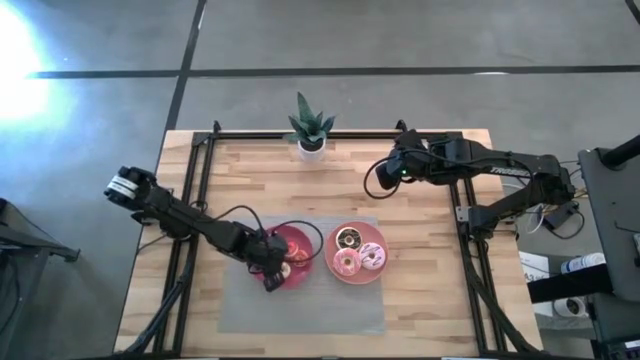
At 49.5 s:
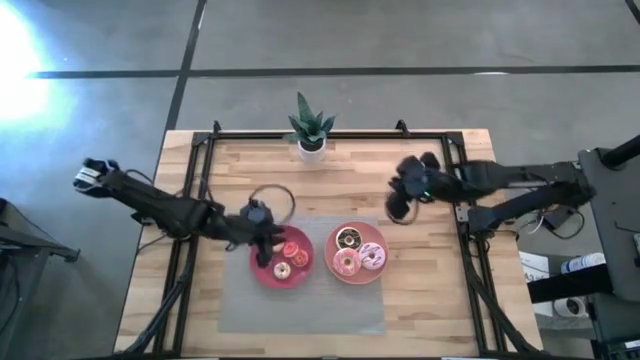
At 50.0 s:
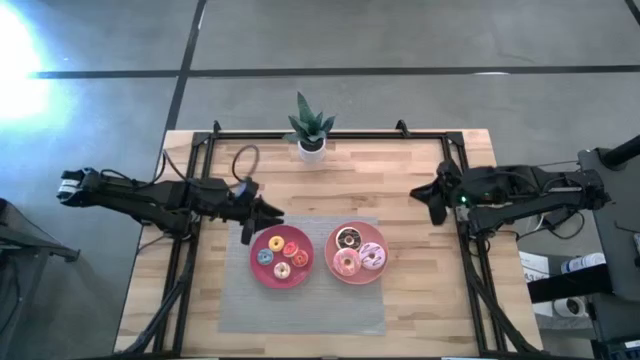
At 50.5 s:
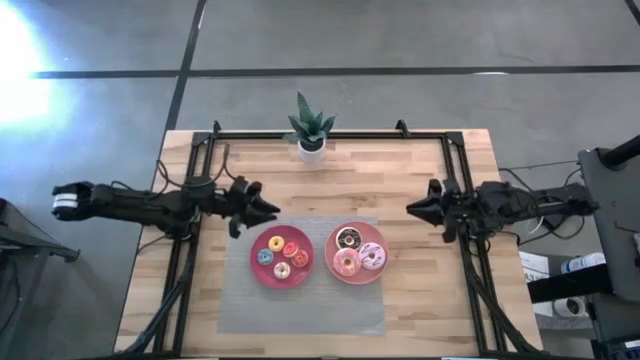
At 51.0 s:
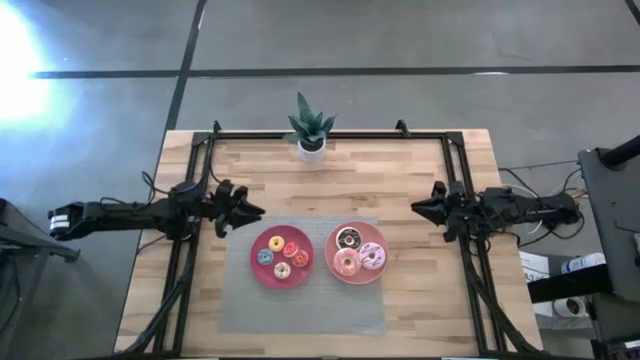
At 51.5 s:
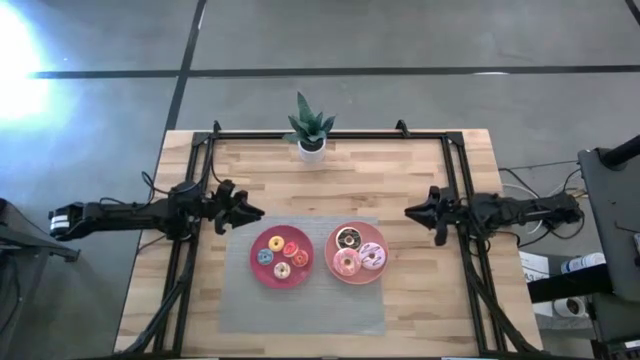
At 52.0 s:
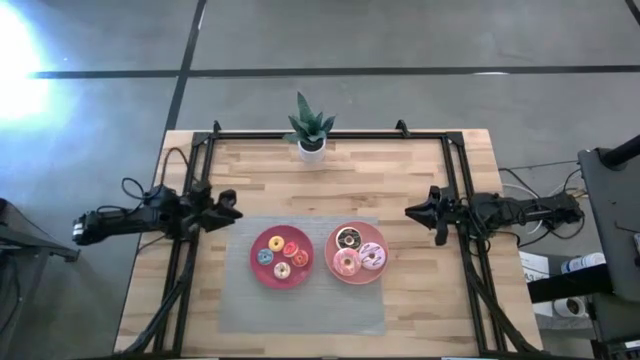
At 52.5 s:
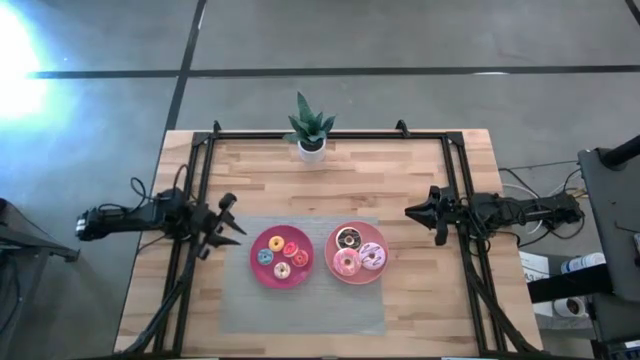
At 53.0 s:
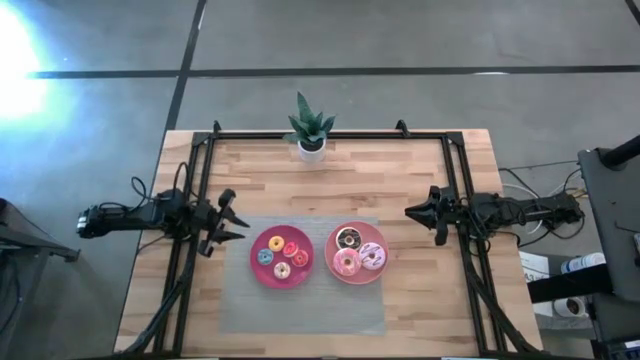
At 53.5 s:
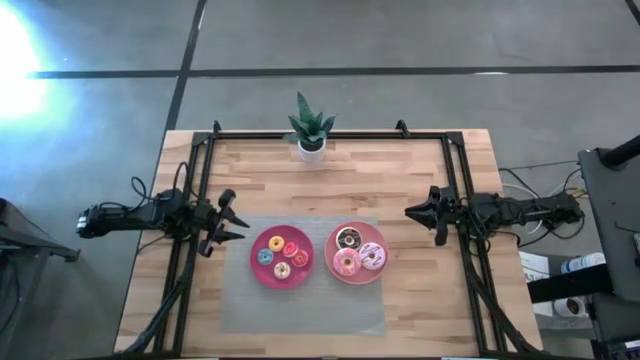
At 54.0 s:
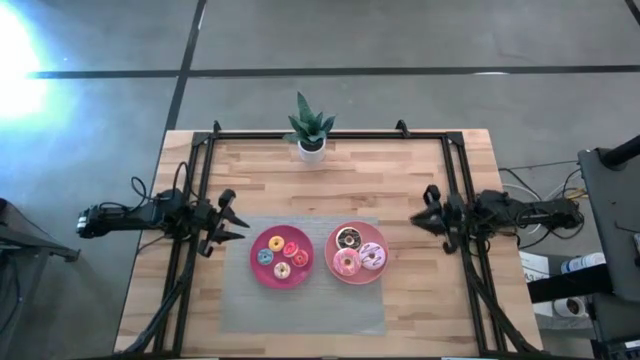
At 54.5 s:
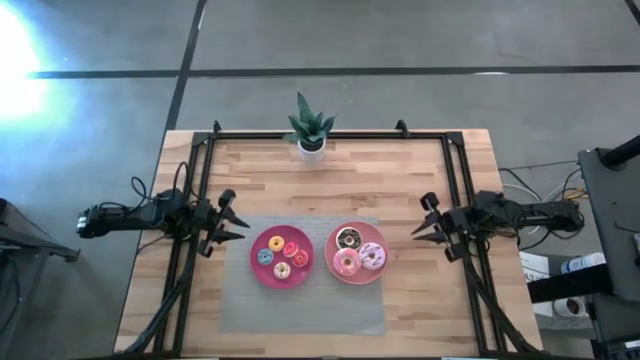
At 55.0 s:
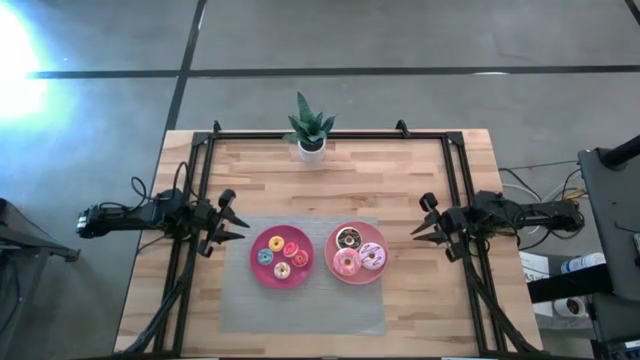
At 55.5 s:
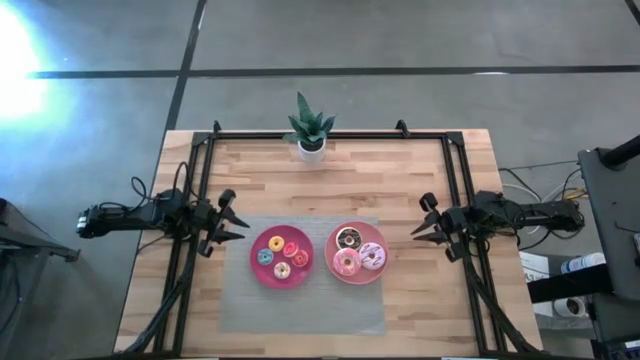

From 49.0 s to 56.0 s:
Task: Pick & Place donuts
Return to Home Position

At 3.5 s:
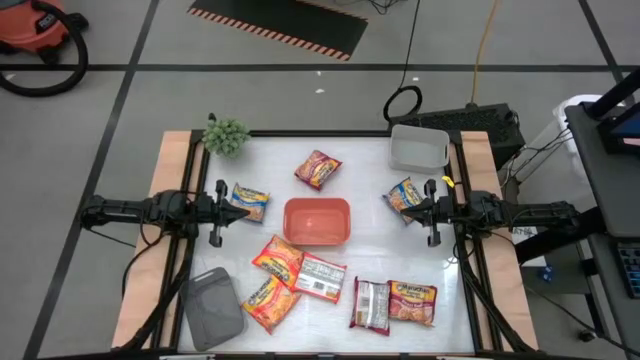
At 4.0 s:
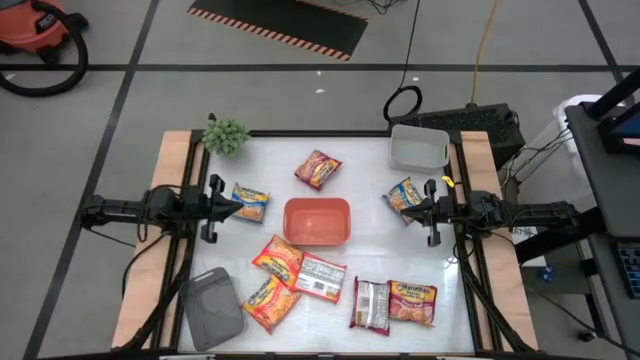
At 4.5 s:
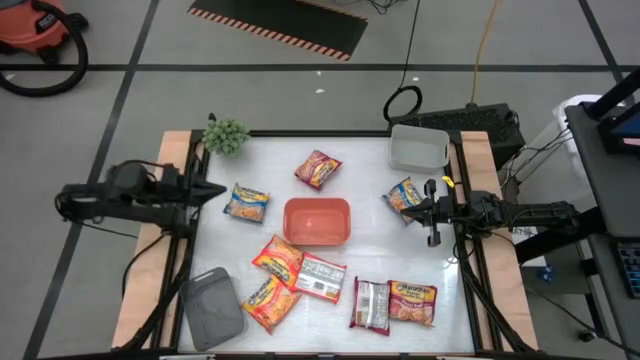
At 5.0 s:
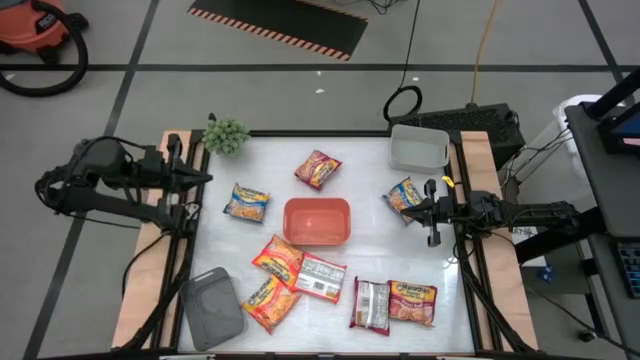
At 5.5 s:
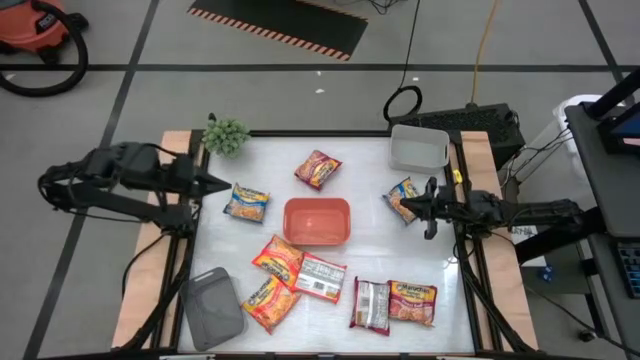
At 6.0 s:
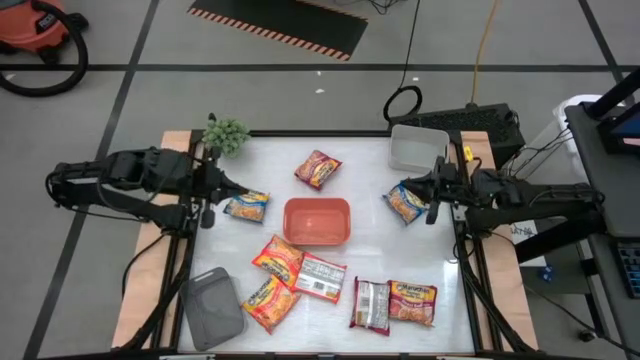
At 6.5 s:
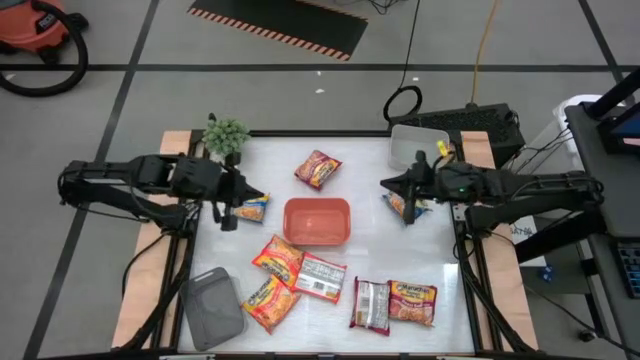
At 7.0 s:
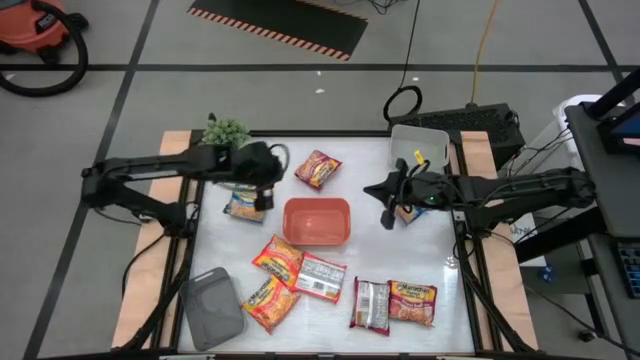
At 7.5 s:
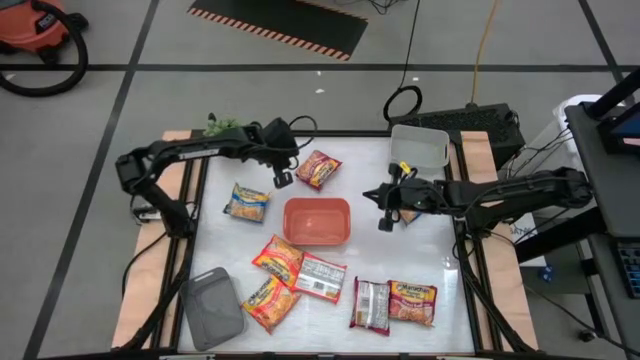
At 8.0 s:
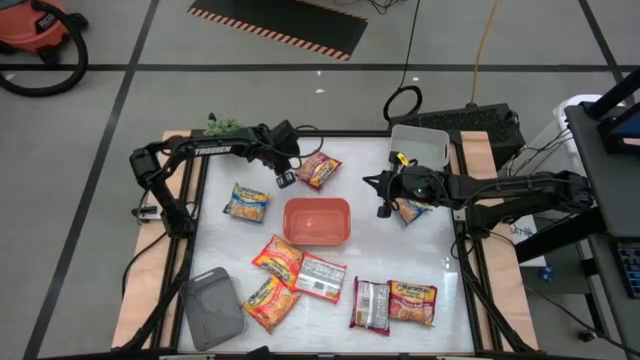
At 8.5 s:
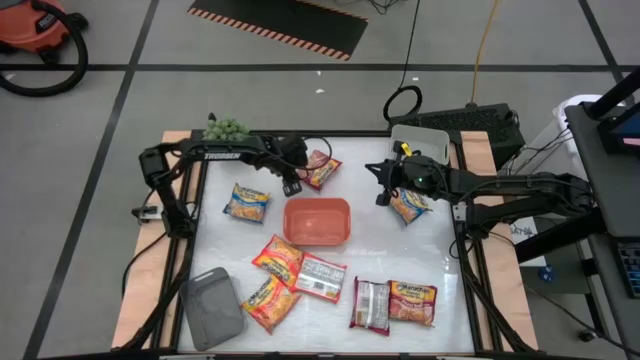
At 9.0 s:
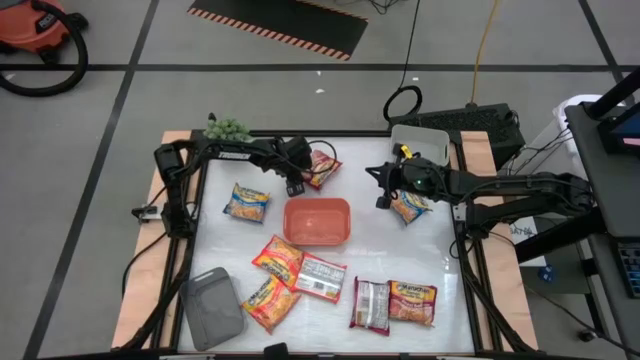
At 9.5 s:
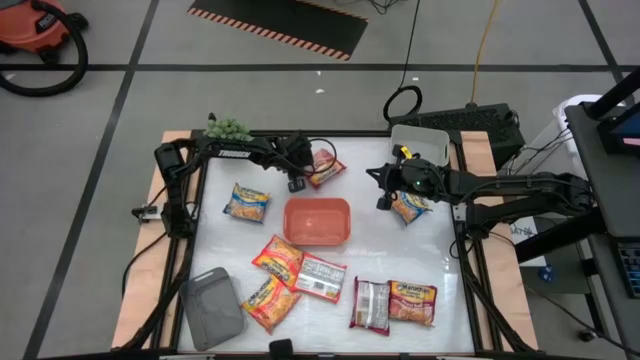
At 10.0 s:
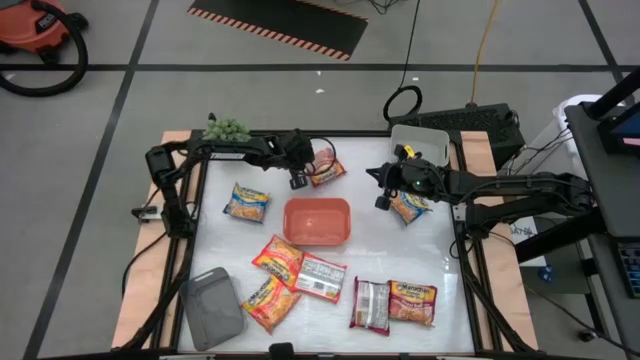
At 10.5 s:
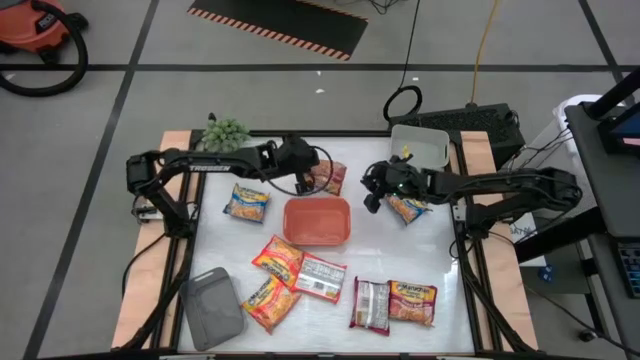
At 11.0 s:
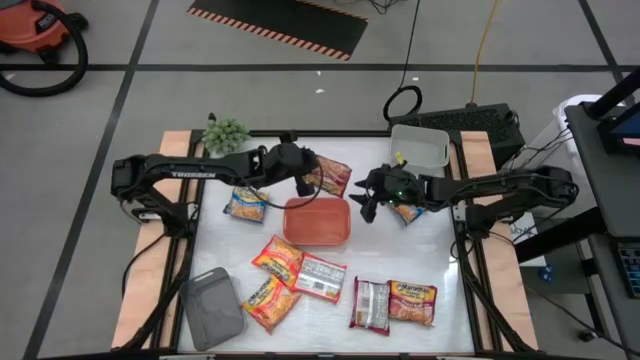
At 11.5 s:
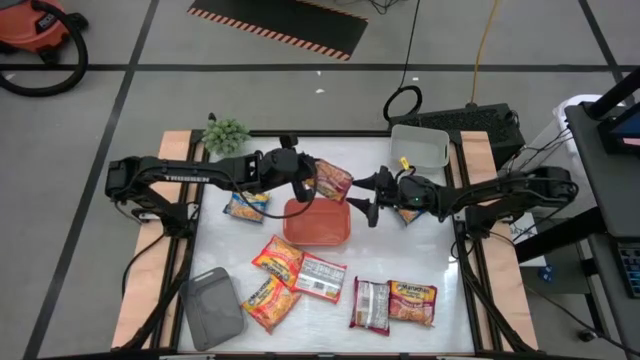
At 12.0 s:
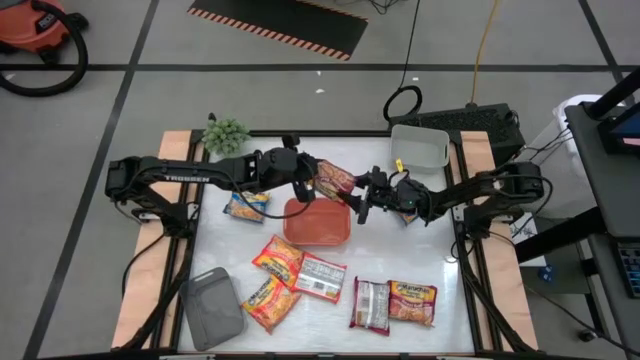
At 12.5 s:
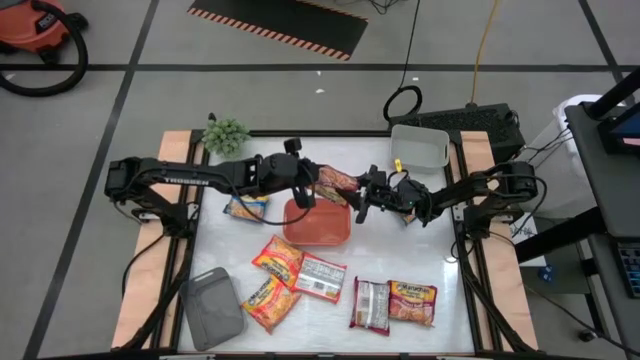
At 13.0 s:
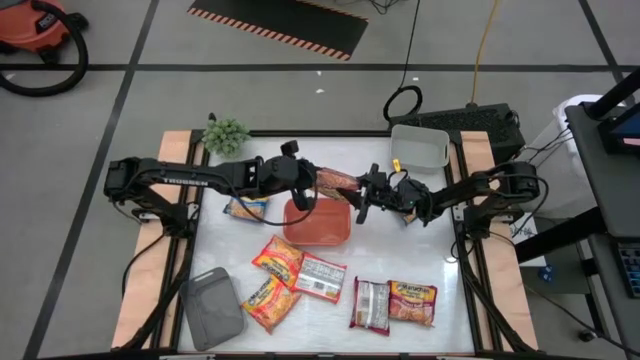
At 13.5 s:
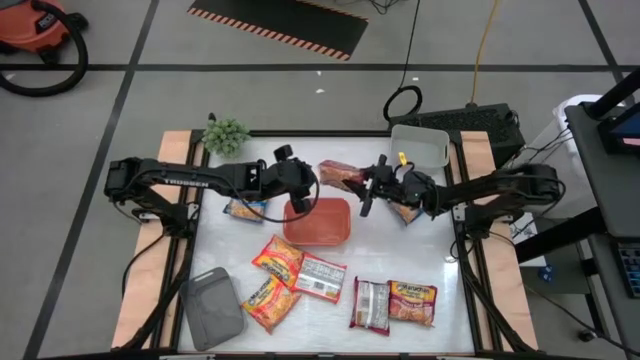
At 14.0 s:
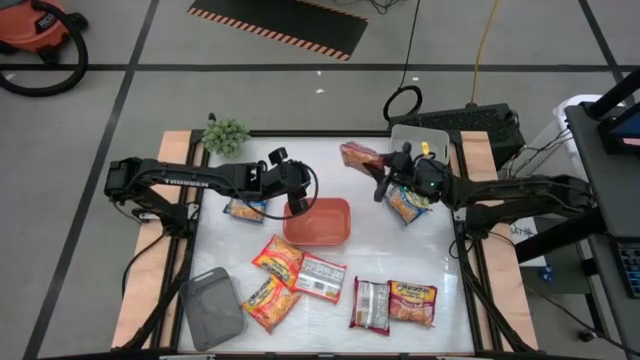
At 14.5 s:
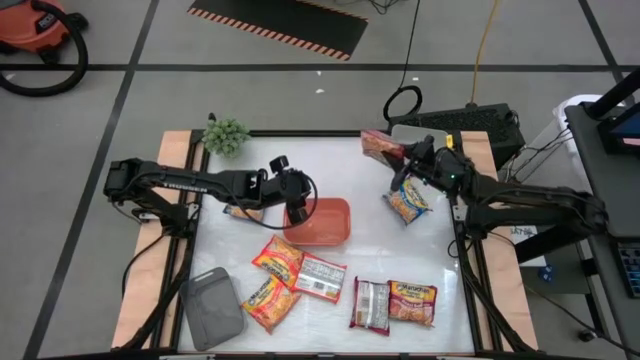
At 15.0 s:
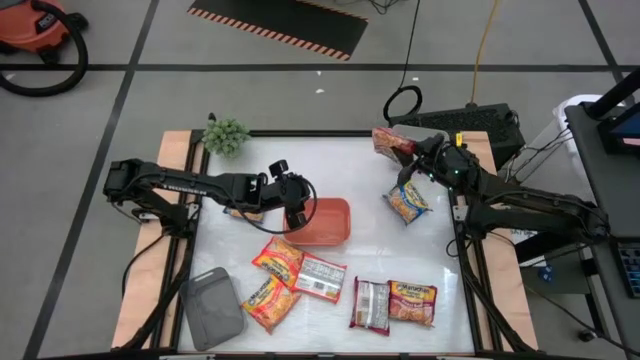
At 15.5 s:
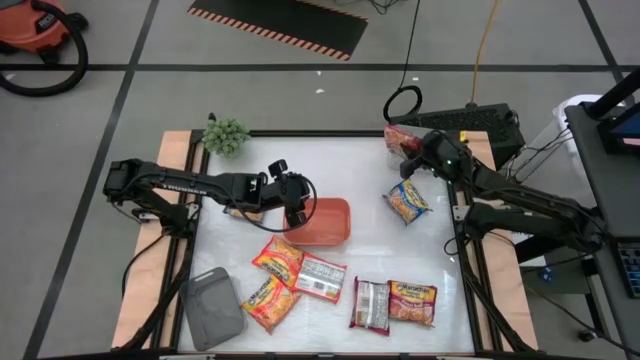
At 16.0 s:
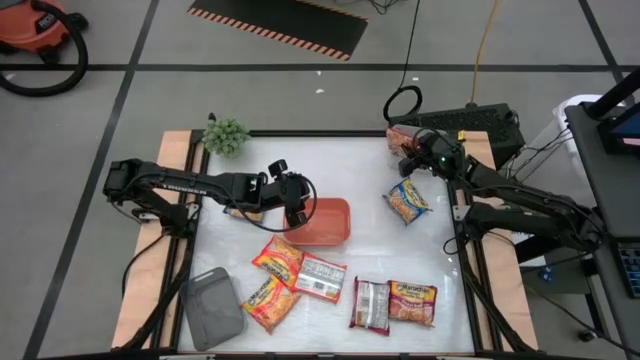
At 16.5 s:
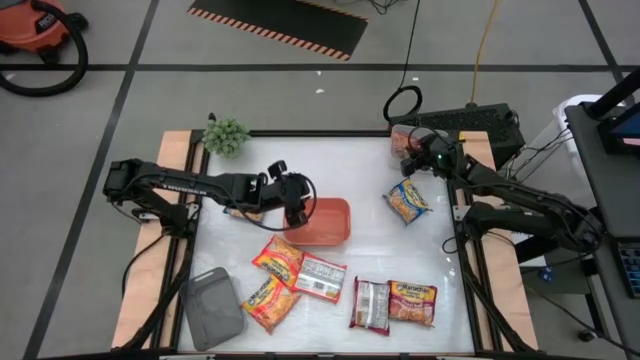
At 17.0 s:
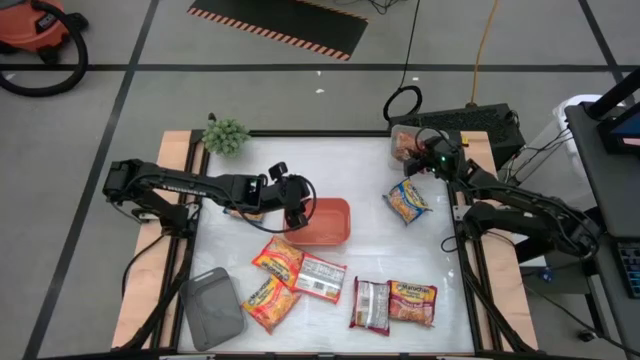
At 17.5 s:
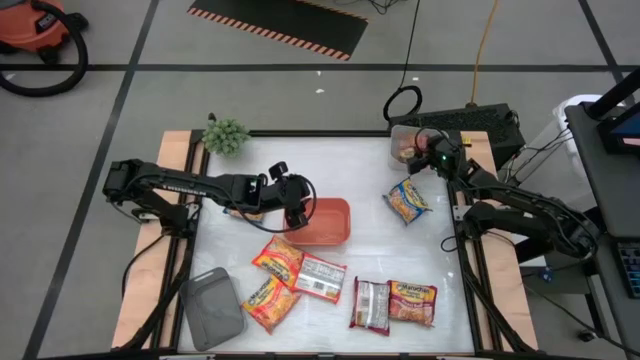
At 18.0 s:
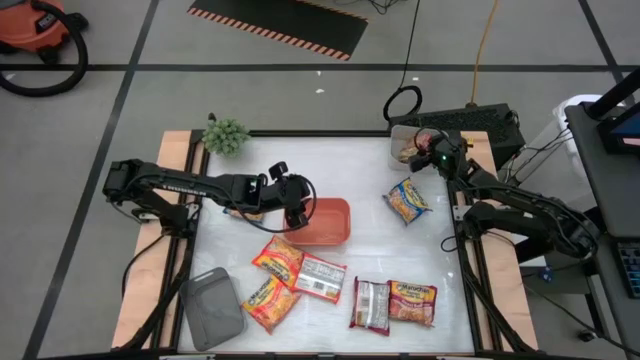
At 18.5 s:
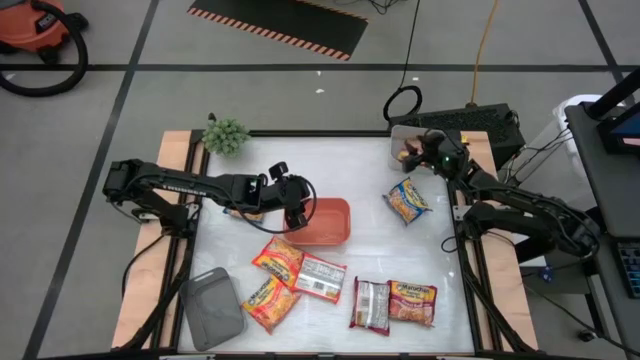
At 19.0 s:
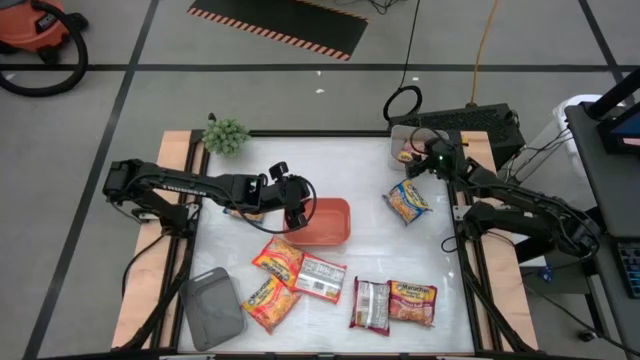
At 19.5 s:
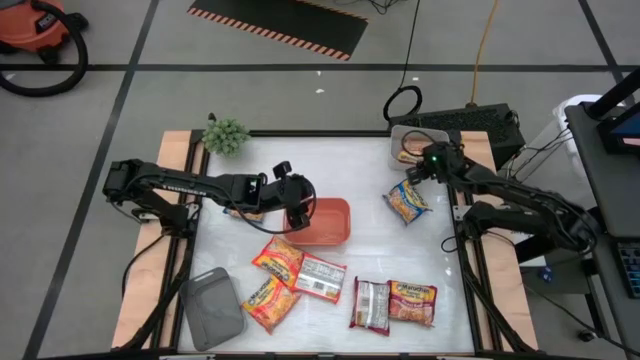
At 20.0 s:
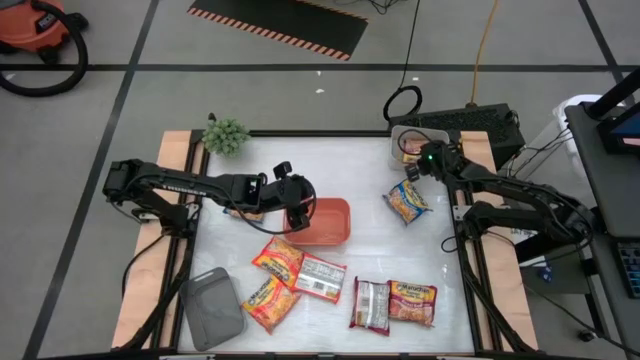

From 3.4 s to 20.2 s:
Task: Sort Maruchan noodles
Put the top left red noodle pack into the gray bin
